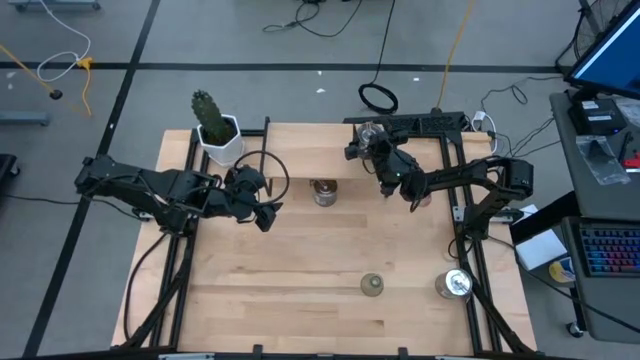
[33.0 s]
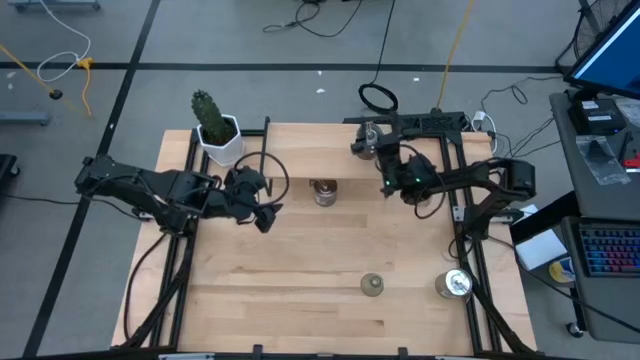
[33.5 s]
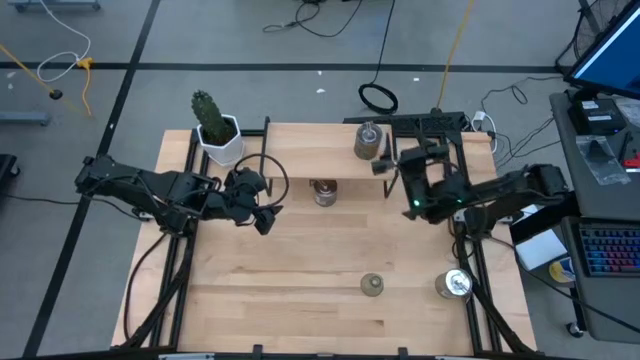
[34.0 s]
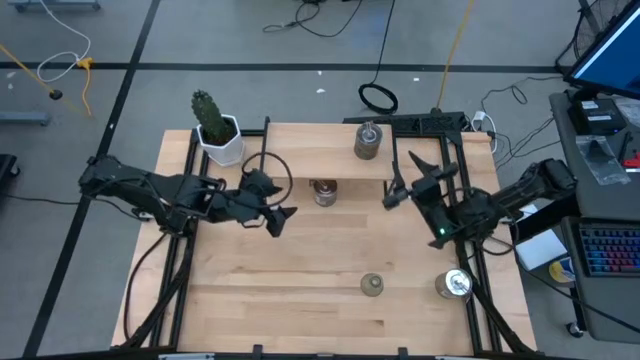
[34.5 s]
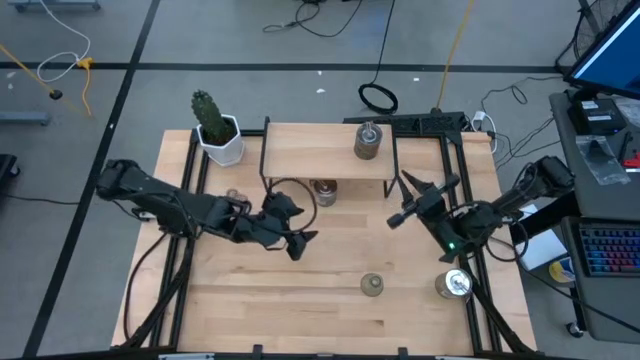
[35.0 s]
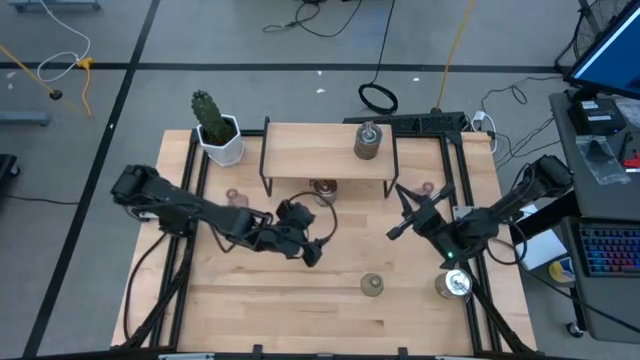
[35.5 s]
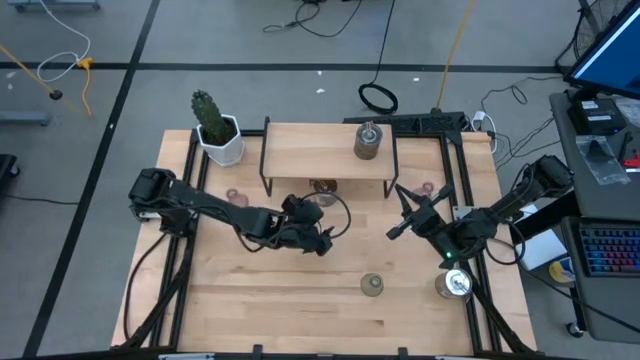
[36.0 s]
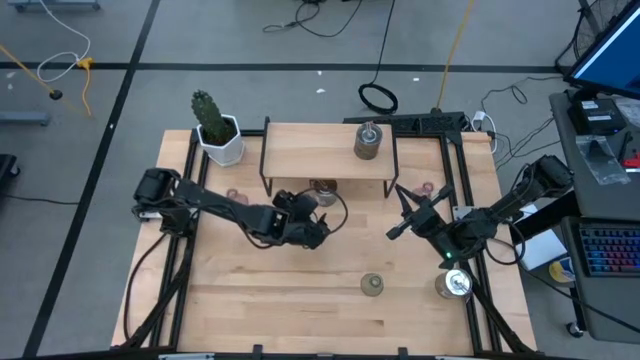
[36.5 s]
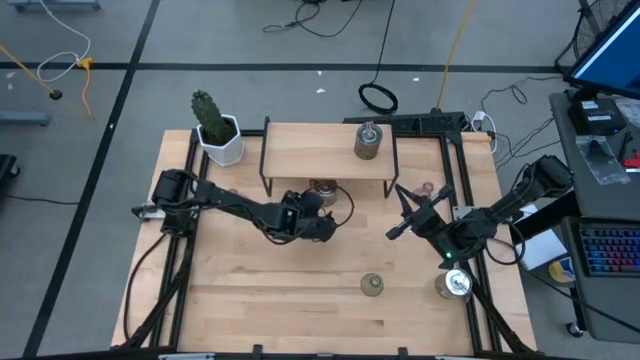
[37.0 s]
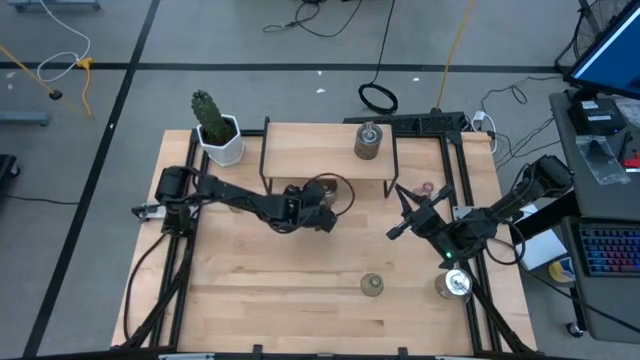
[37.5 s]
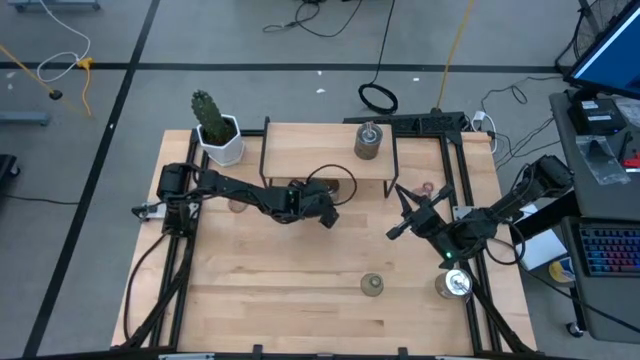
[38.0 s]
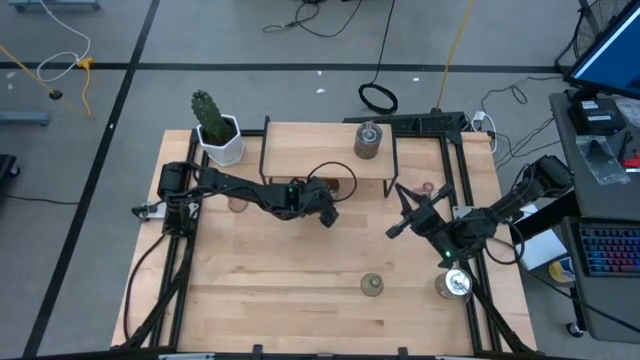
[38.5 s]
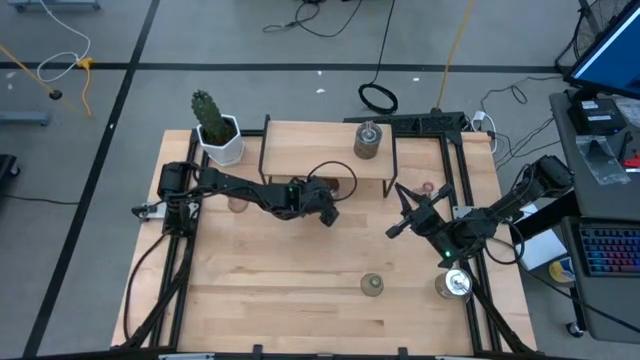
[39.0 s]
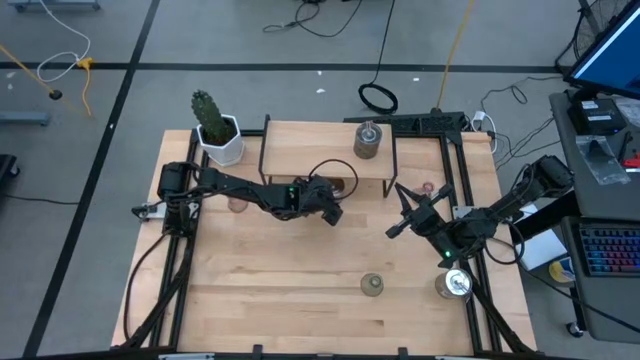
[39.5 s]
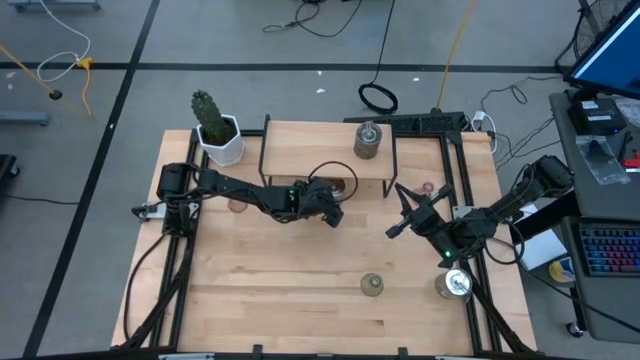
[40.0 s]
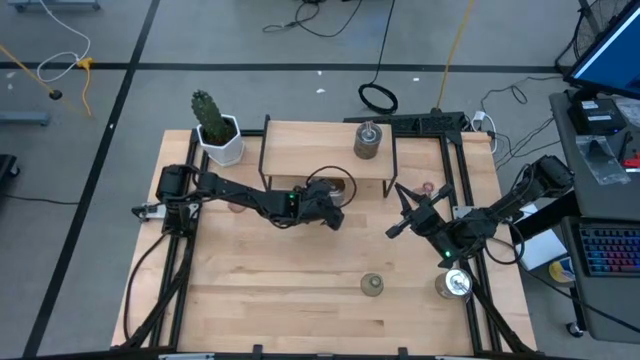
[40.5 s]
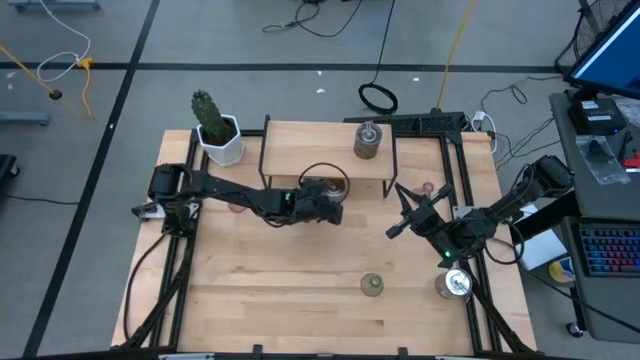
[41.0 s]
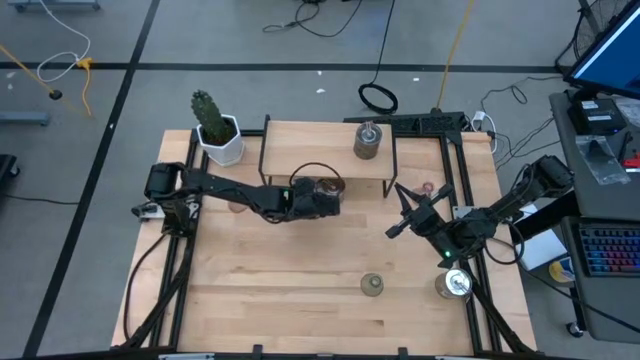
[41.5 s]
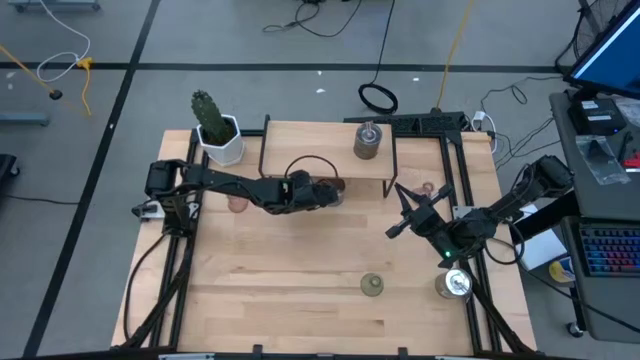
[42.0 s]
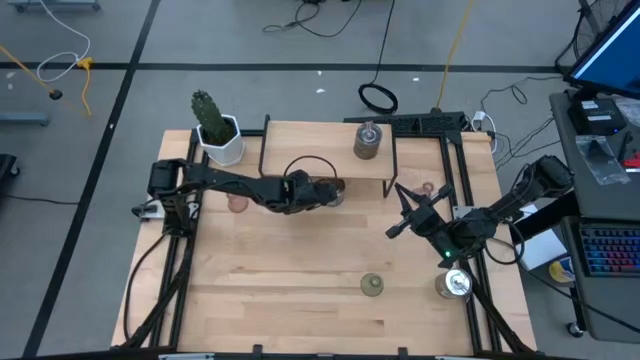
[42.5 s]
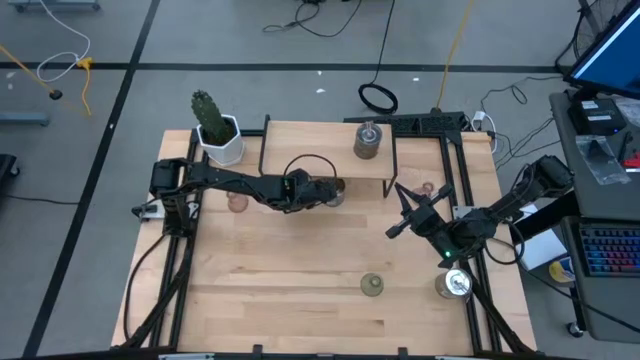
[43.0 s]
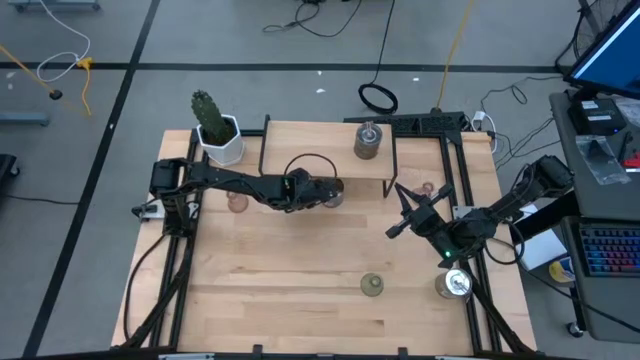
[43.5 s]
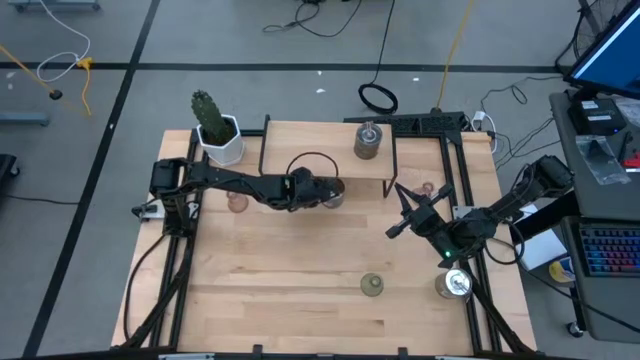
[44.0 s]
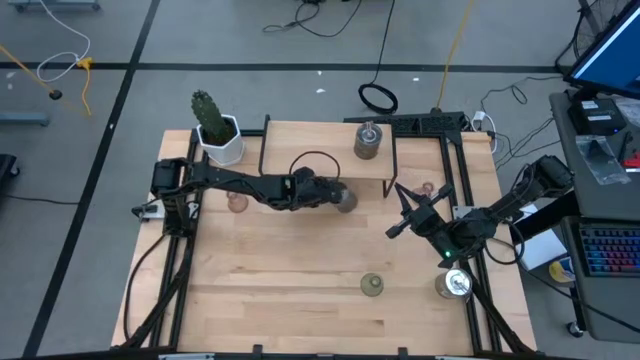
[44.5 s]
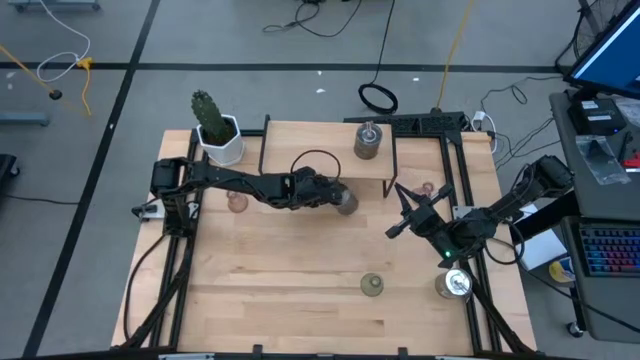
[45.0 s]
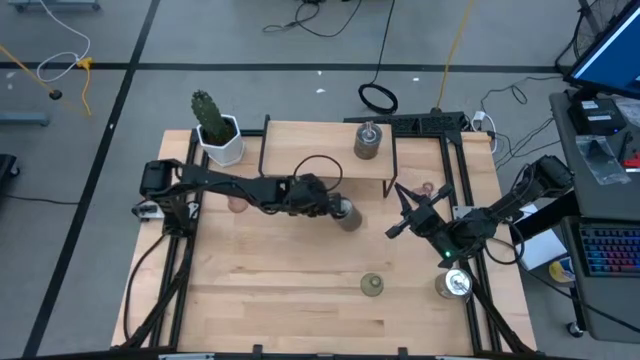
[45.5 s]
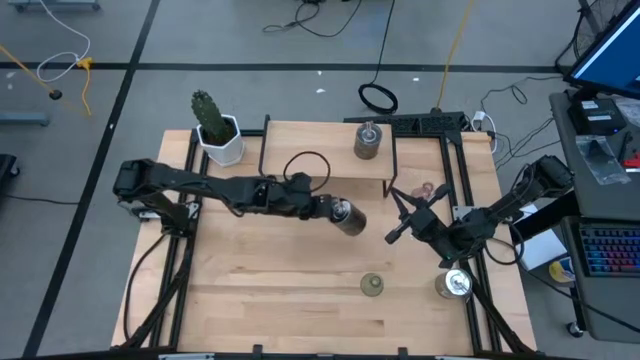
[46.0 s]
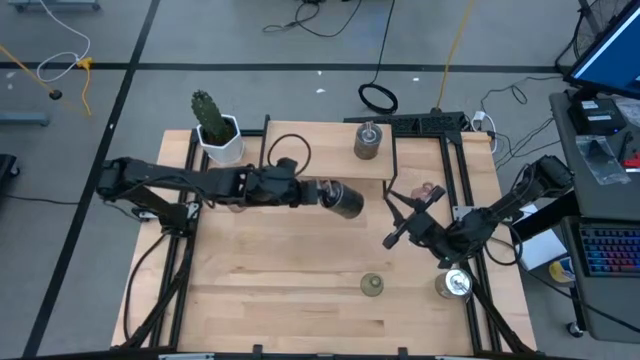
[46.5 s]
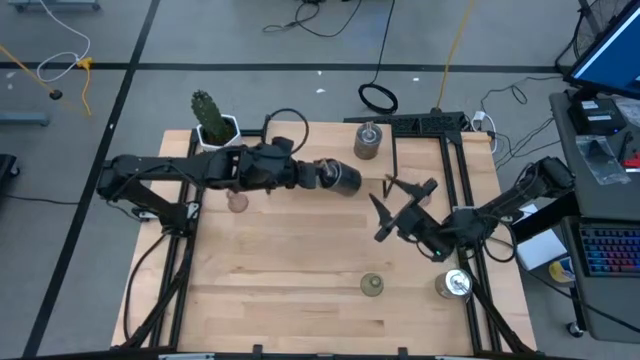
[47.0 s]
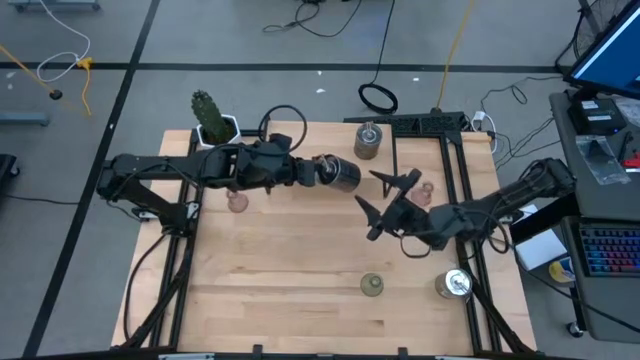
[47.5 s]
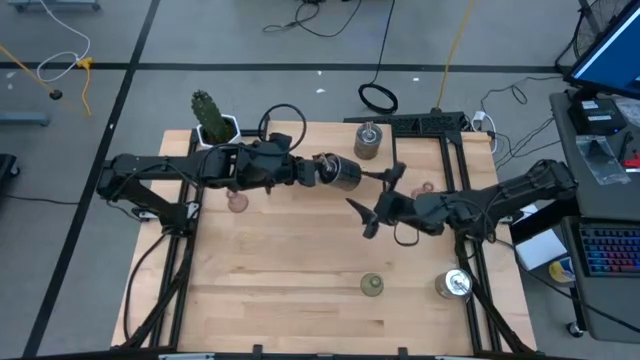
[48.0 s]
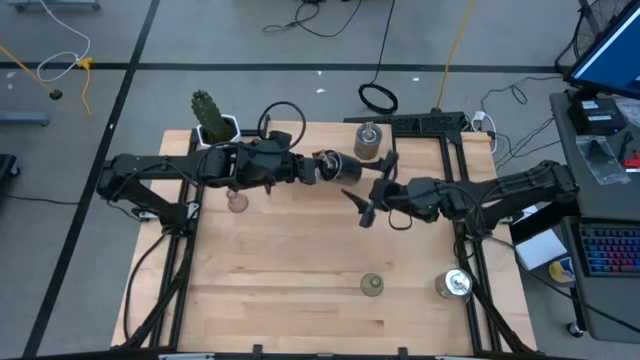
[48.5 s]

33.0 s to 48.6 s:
Task: Pick & Place candle stick holders
Put the top brown scented candle on the shelf

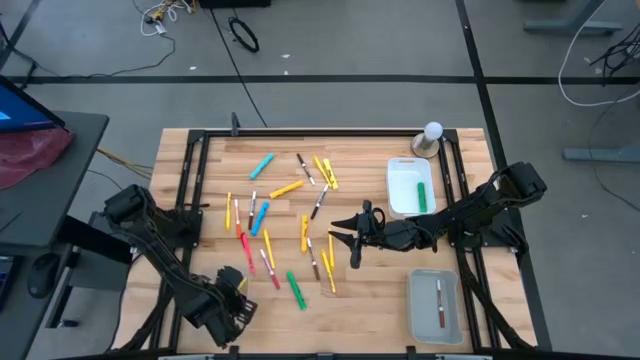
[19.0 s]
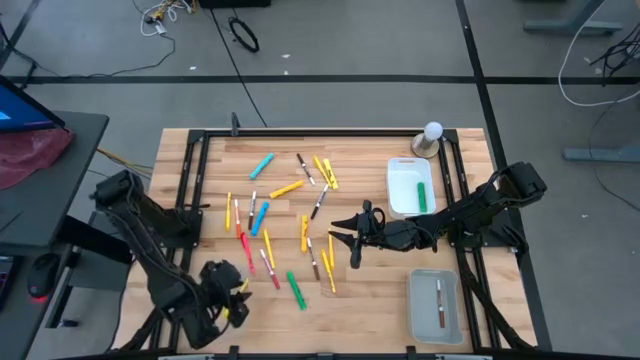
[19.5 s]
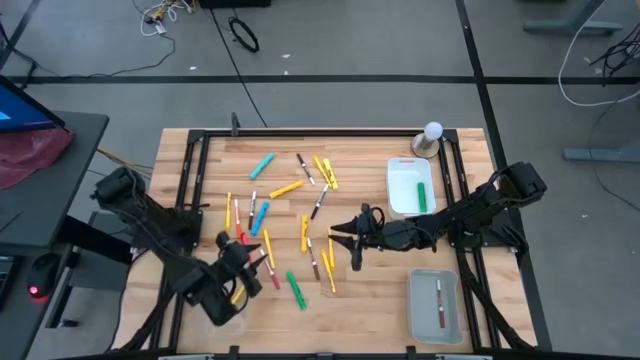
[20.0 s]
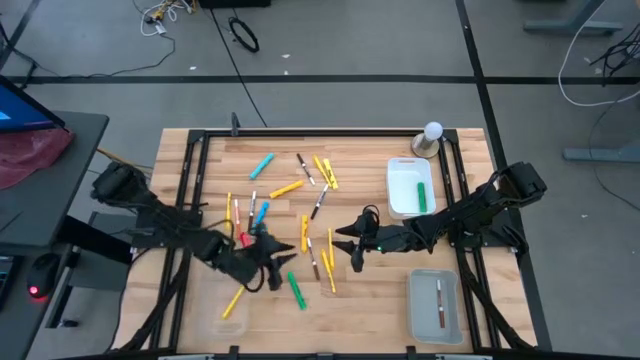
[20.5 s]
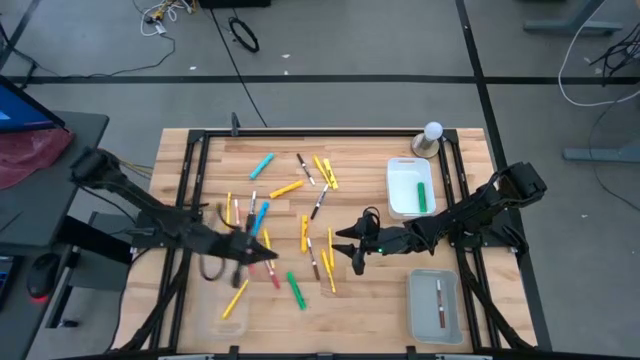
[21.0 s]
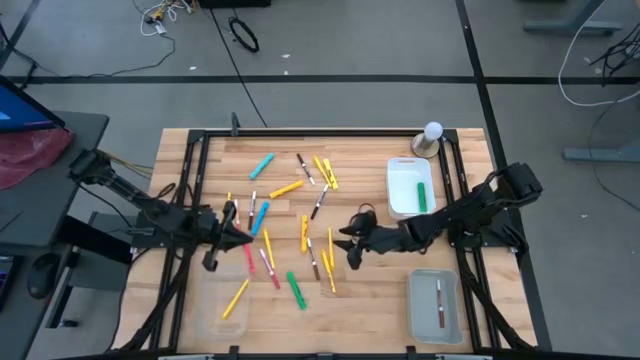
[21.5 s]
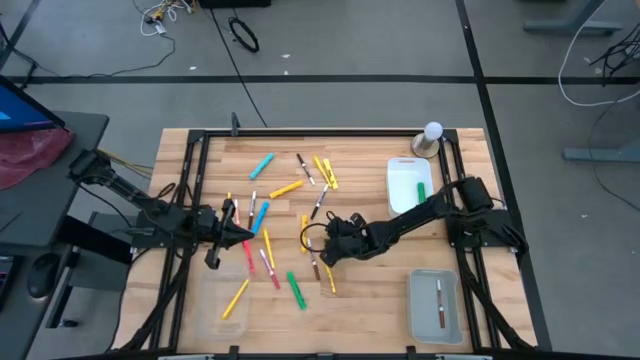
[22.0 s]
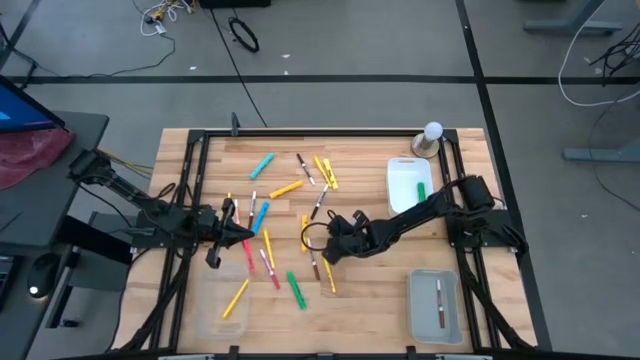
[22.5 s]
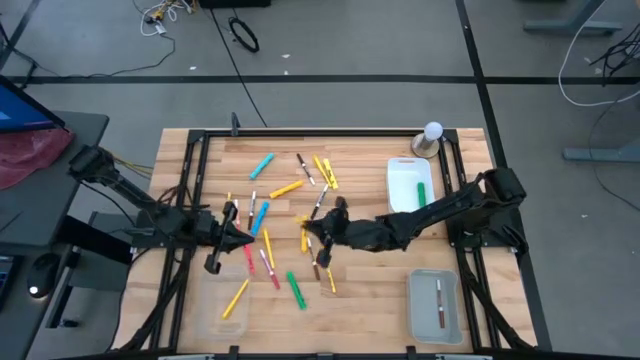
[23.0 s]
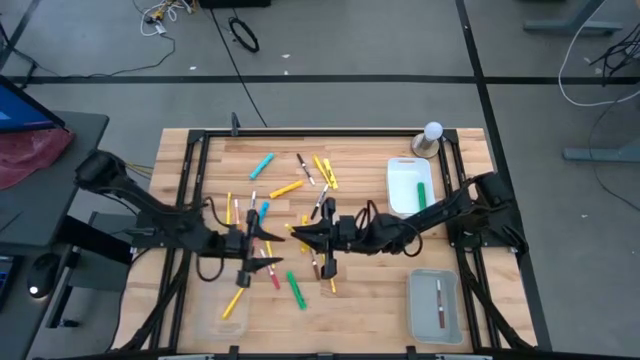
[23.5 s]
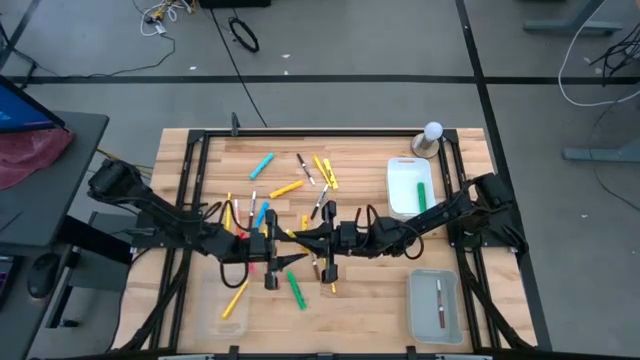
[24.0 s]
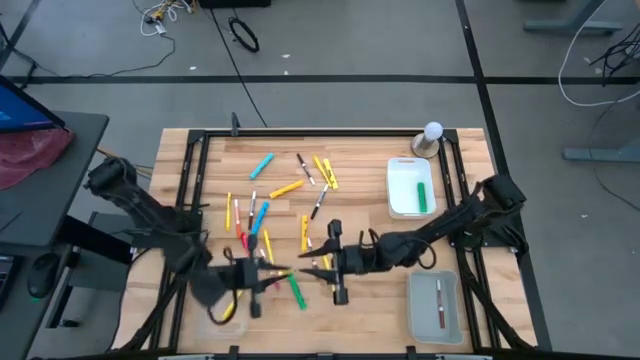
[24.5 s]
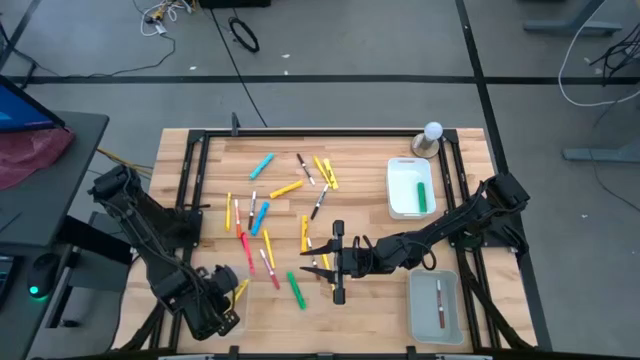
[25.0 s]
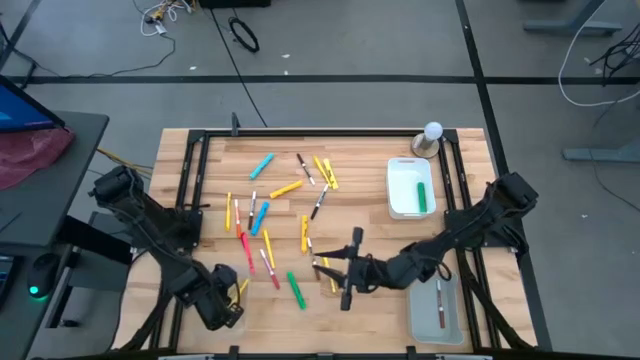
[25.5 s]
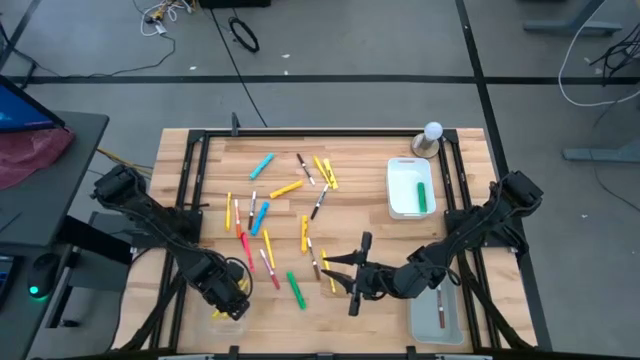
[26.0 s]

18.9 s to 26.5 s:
Task: Pick & Place Markers
Put the yellow pen into the transparent bin
